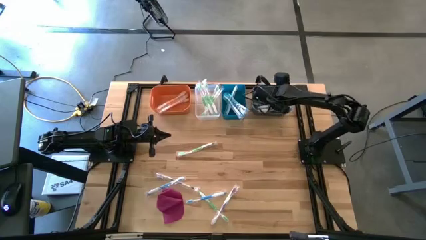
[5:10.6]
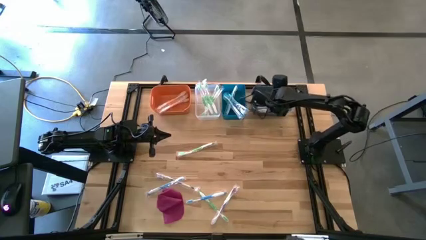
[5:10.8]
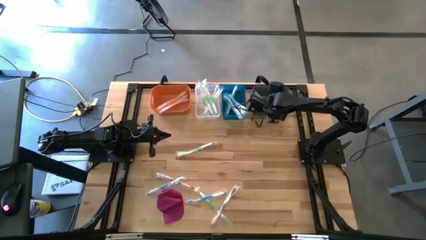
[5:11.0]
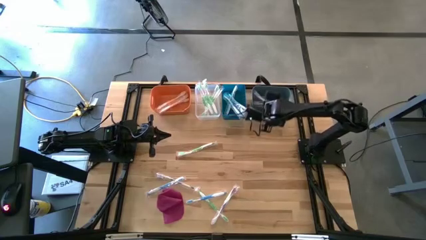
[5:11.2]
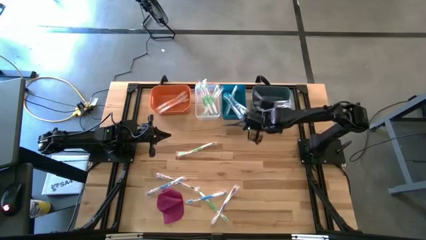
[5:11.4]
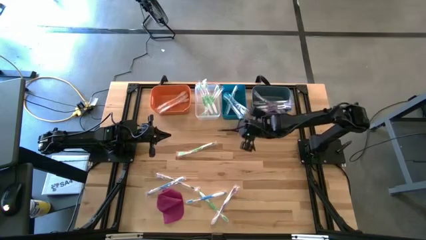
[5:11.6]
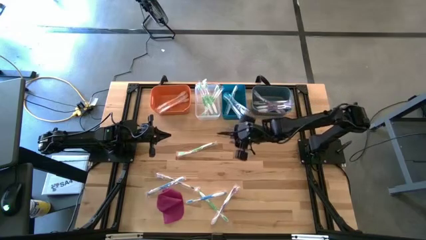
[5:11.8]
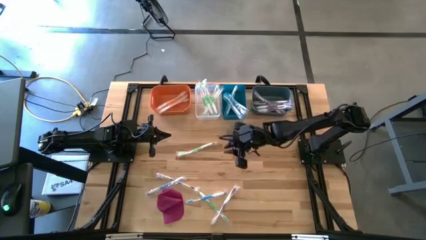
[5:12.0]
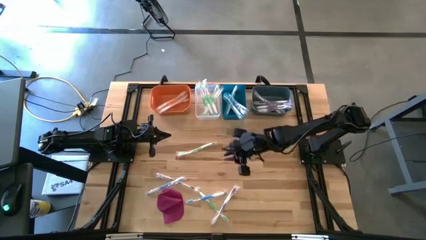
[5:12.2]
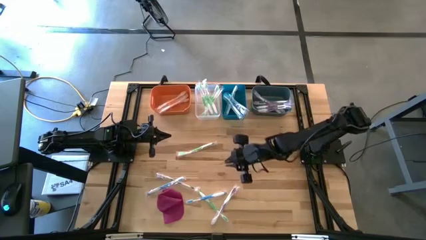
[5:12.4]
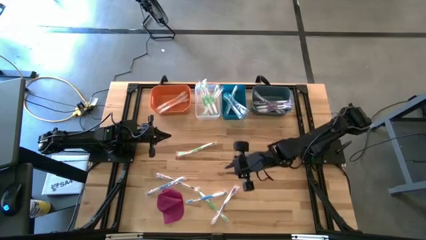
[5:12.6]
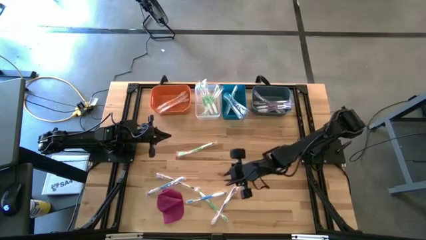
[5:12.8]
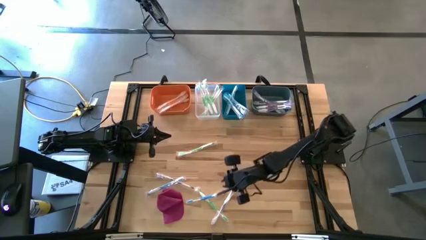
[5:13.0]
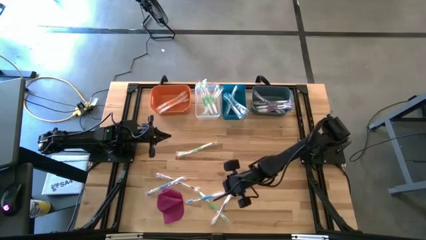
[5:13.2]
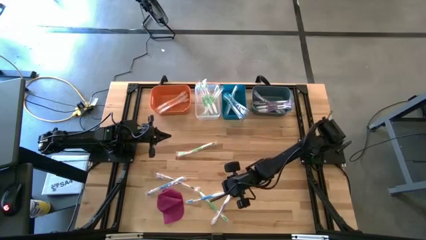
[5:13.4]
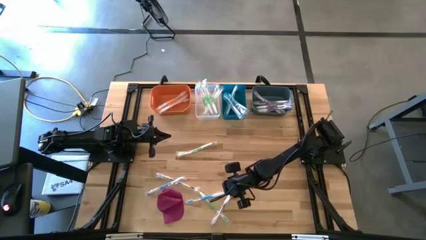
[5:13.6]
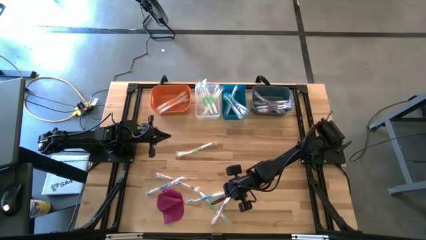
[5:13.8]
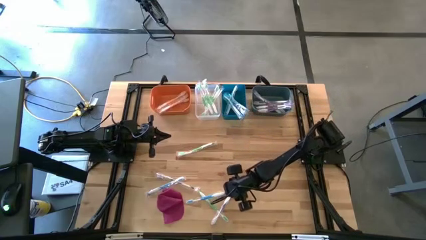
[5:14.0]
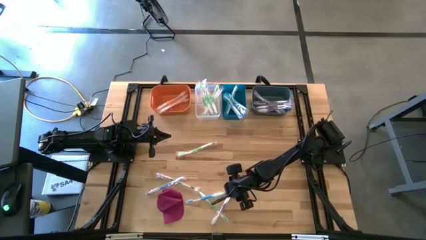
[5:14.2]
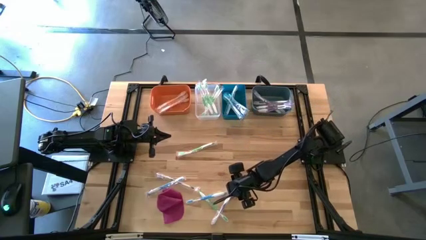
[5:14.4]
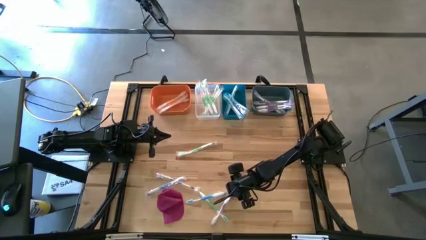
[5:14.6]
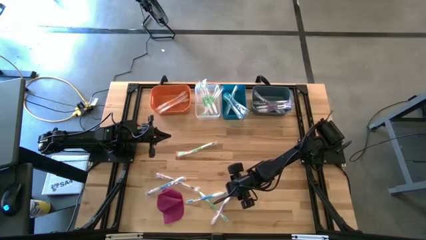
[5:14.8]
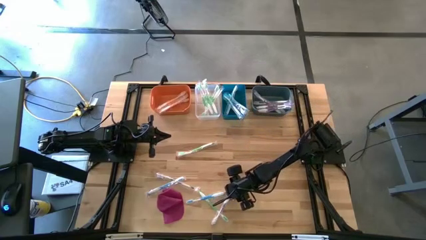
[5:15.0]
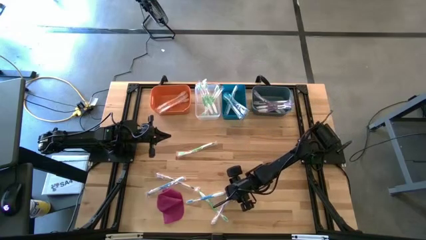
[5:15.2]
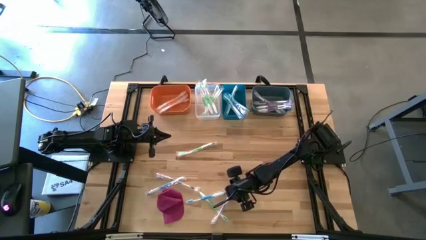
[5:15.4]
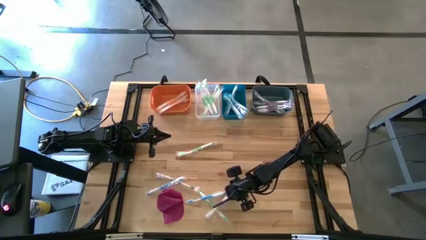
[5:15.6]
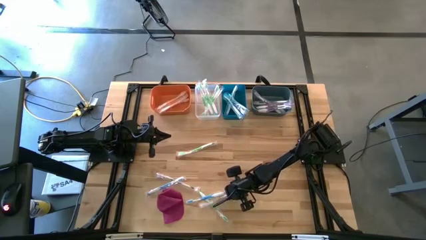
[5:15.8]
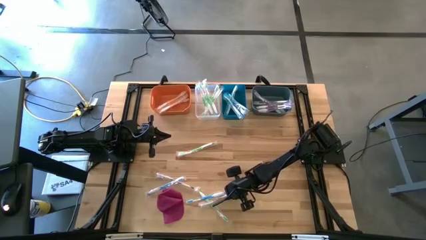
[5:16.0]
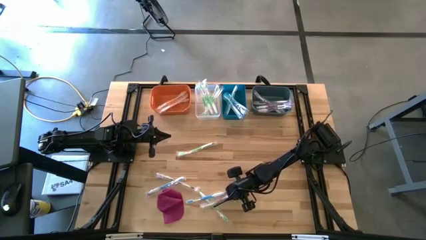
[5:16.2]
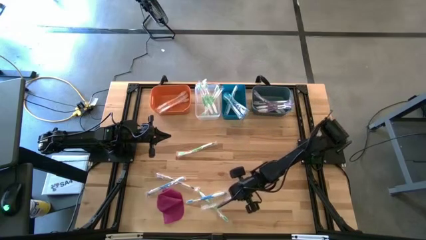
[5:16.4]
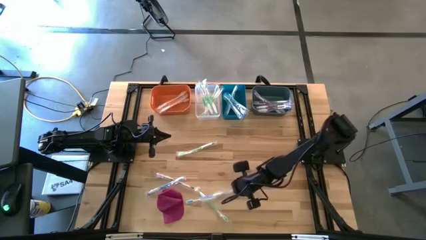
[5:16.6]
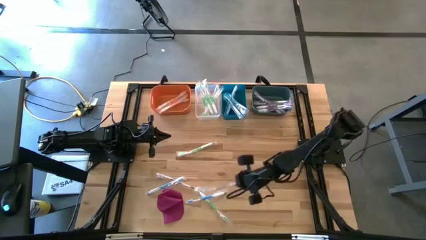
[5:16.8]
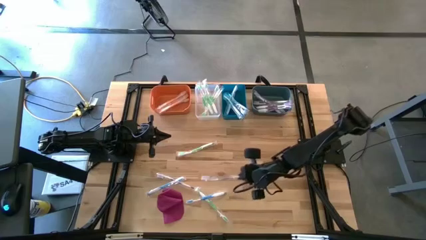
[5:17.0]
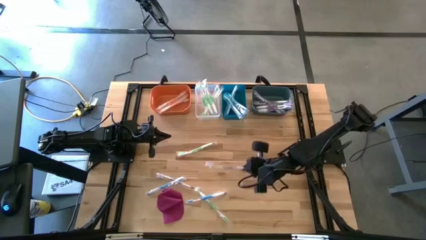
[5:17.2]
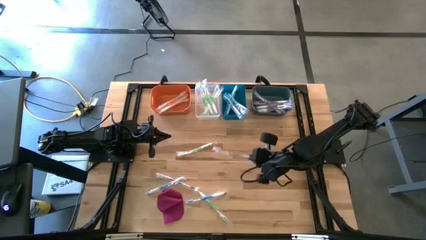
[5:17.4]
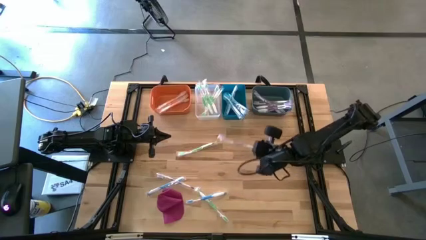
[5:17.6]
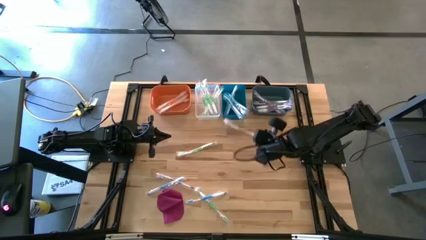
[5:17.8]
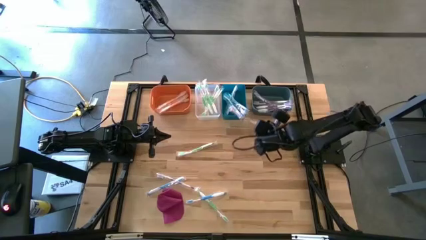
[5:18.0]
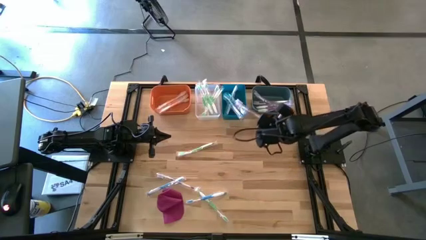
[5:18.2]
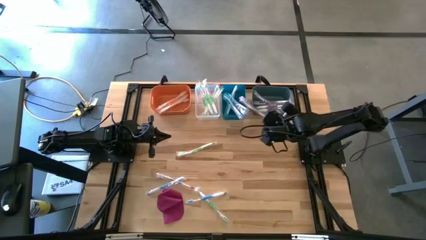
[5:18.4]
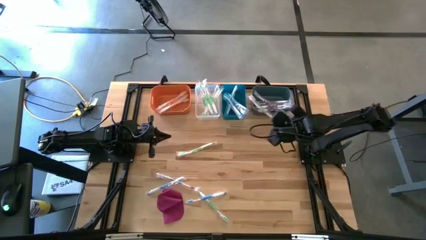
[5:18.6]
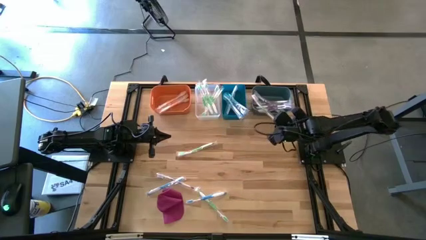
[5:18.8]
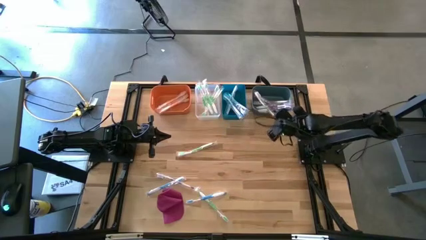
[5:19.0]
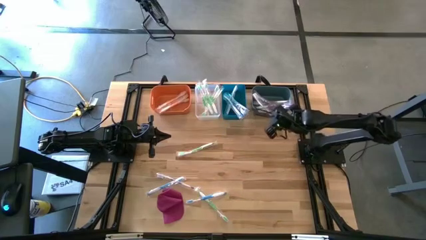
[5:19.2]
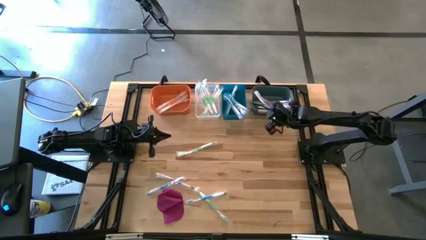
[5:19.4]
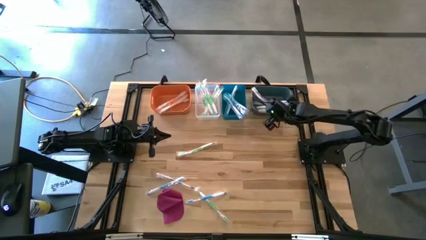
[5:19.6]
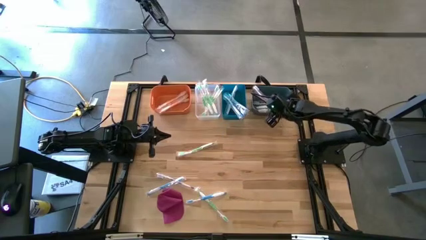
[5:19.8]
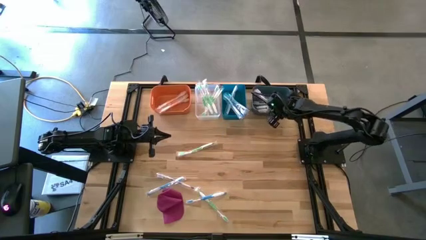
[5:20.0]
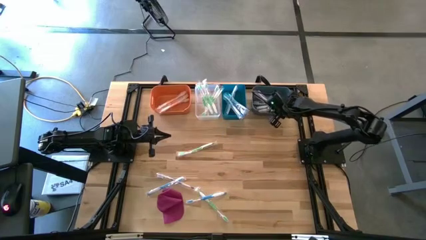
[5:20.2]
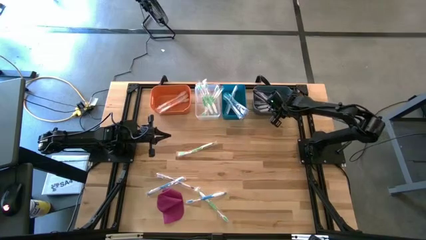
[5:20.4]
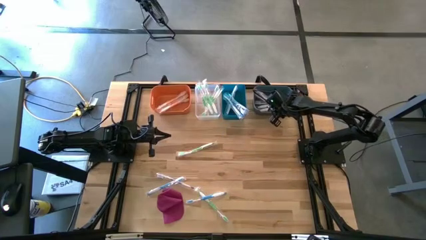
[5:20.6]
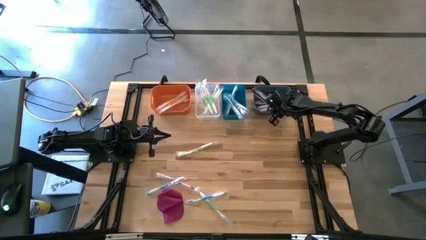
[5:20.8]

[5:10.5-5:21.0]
Task: Pick & Place Toothbrushes
Put the purple toothbrush into the green bin
